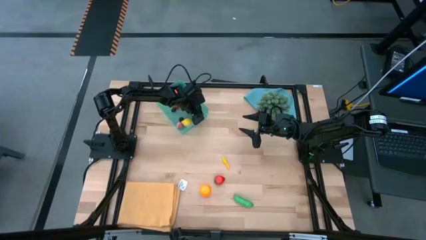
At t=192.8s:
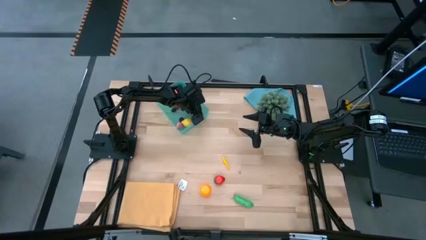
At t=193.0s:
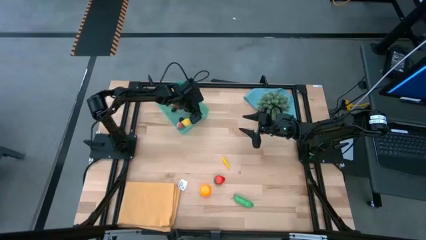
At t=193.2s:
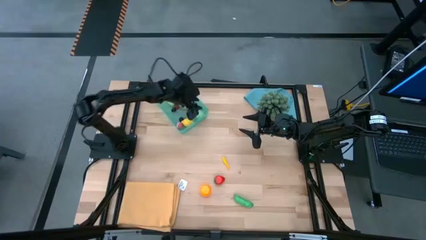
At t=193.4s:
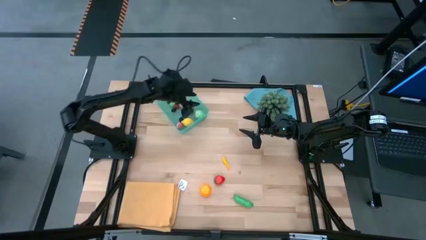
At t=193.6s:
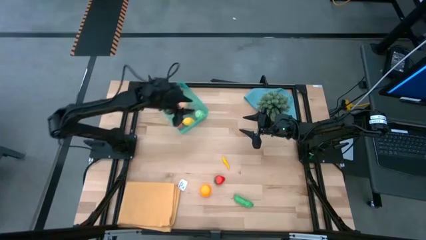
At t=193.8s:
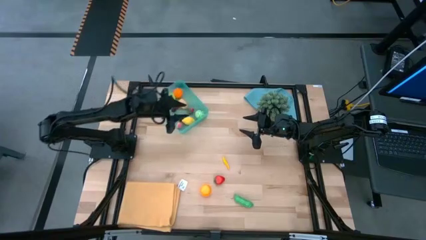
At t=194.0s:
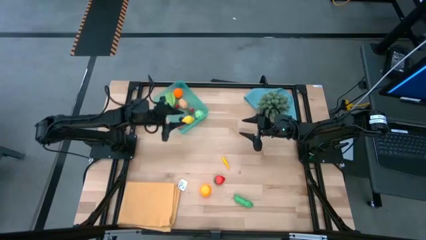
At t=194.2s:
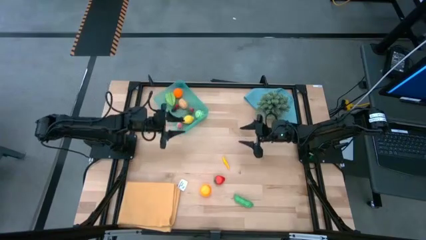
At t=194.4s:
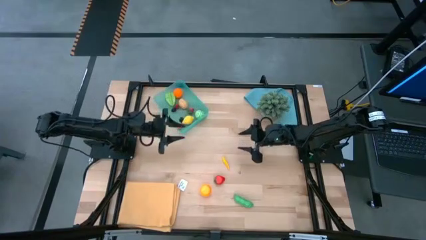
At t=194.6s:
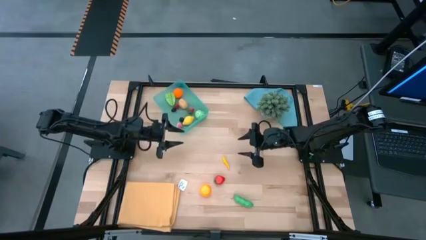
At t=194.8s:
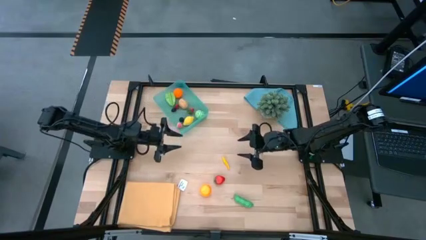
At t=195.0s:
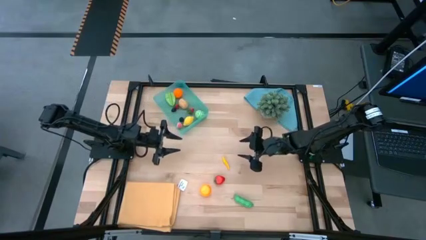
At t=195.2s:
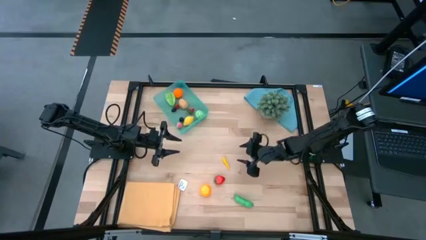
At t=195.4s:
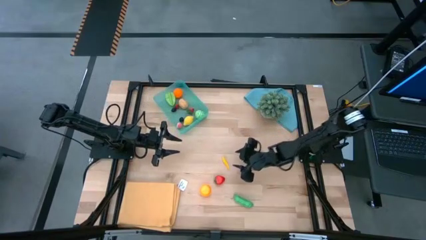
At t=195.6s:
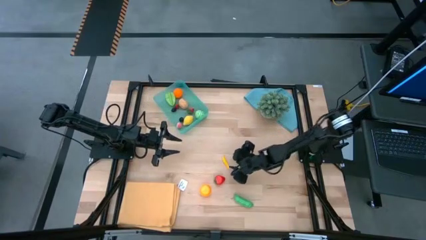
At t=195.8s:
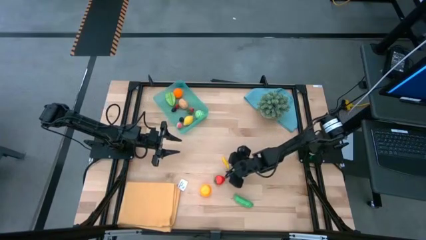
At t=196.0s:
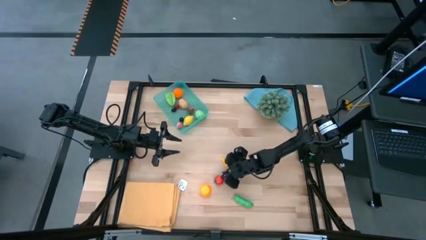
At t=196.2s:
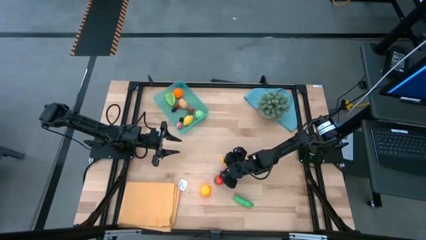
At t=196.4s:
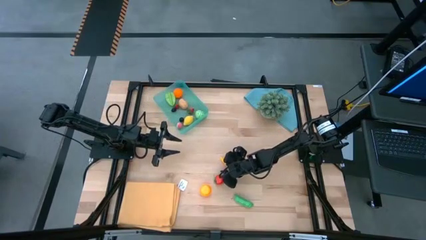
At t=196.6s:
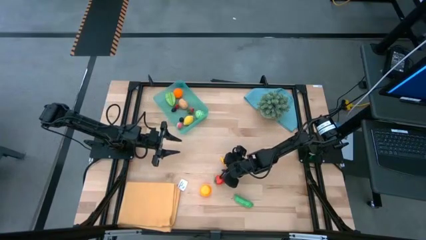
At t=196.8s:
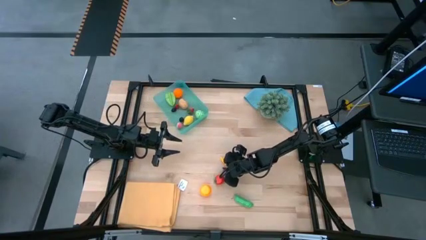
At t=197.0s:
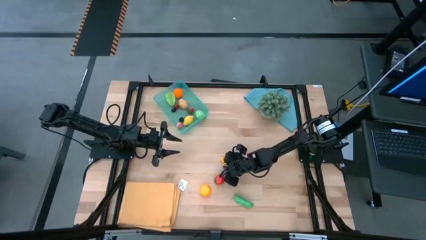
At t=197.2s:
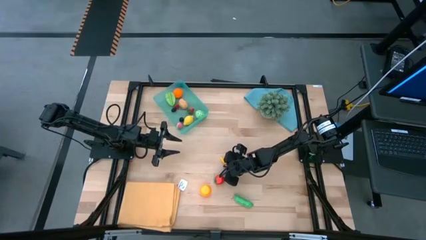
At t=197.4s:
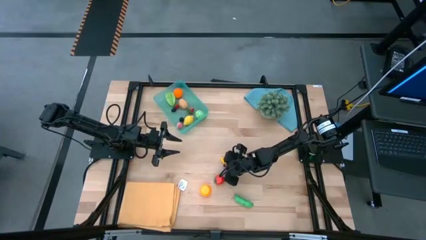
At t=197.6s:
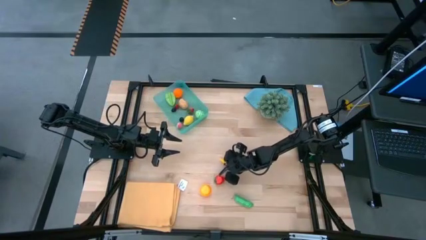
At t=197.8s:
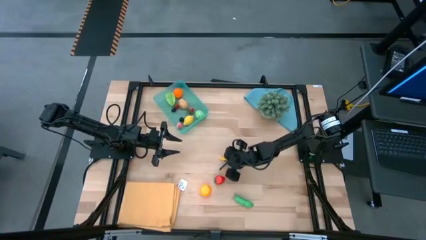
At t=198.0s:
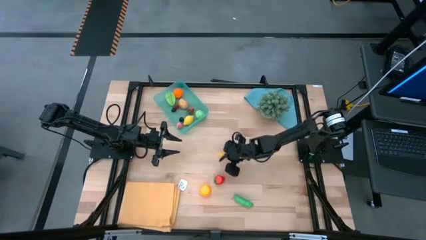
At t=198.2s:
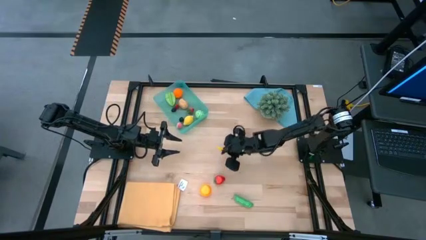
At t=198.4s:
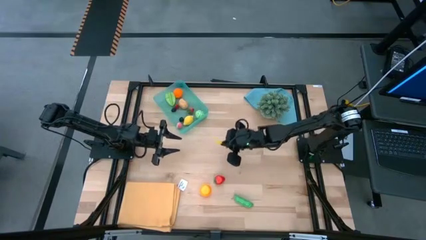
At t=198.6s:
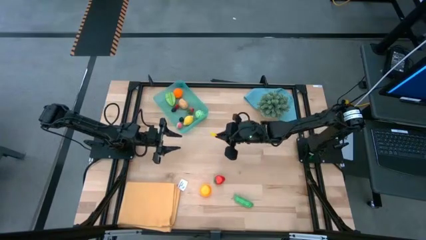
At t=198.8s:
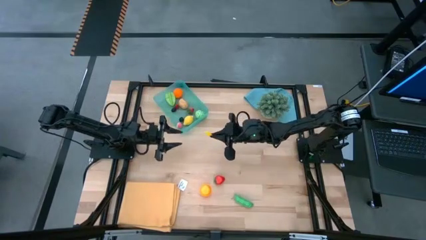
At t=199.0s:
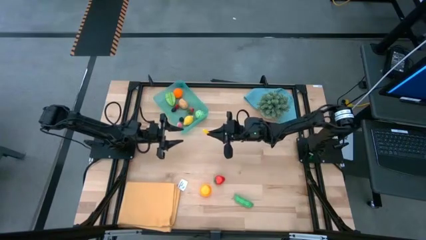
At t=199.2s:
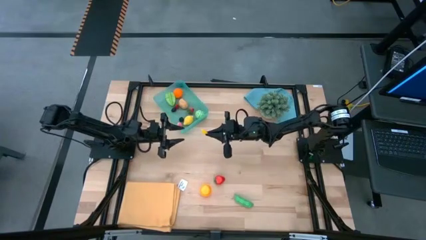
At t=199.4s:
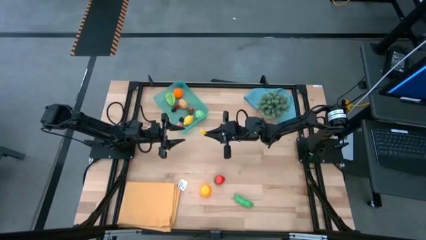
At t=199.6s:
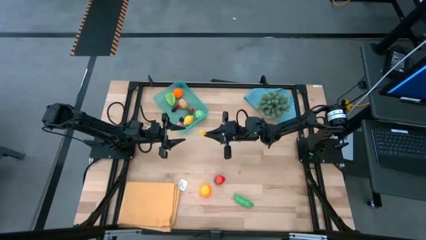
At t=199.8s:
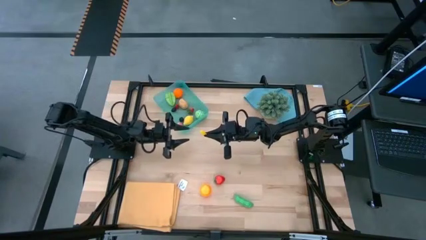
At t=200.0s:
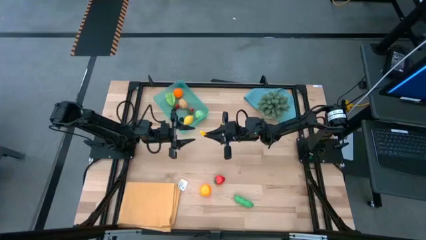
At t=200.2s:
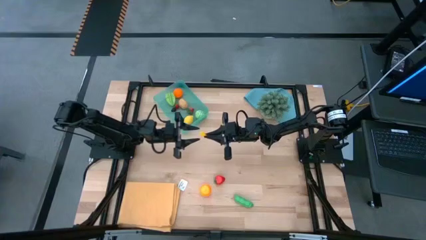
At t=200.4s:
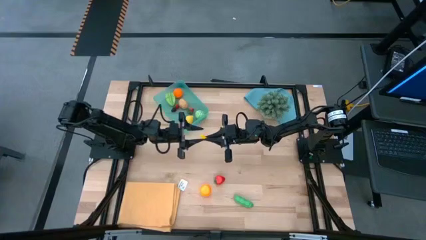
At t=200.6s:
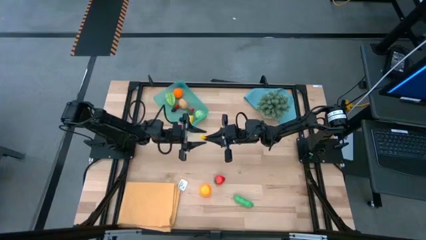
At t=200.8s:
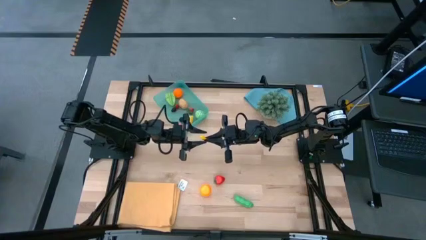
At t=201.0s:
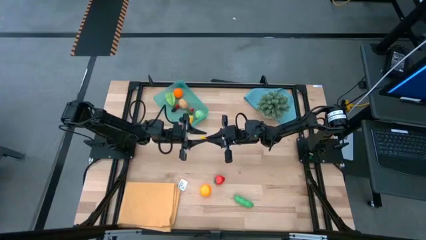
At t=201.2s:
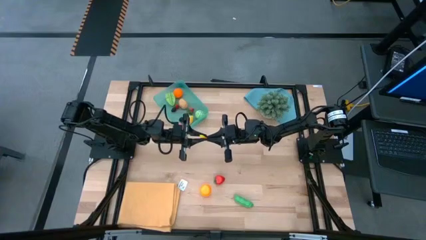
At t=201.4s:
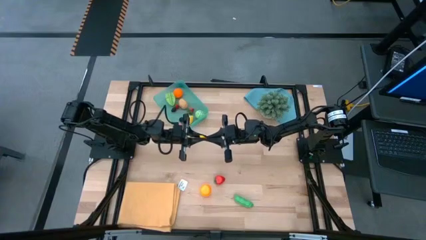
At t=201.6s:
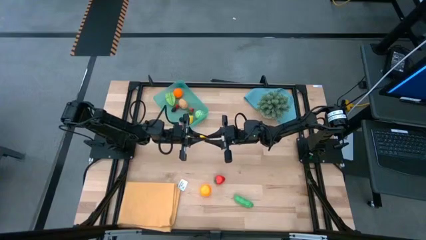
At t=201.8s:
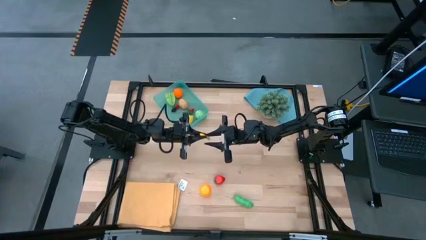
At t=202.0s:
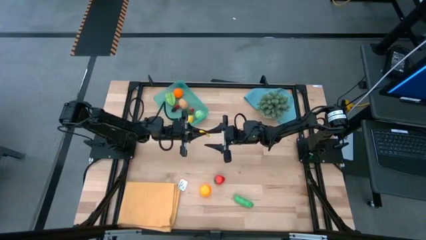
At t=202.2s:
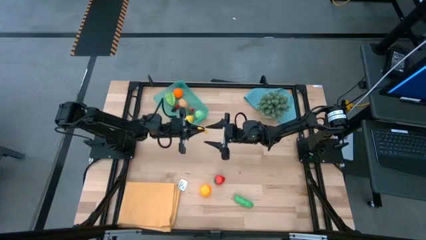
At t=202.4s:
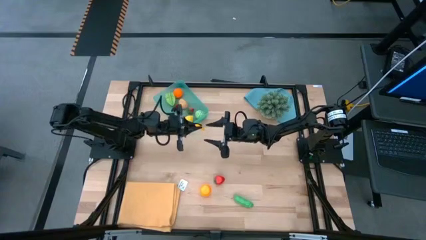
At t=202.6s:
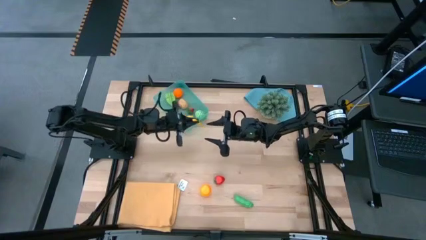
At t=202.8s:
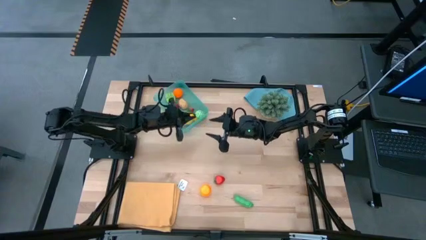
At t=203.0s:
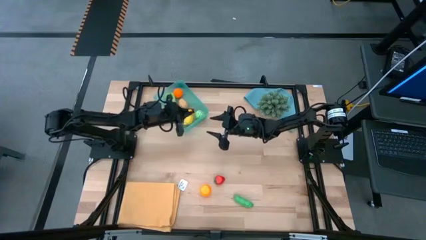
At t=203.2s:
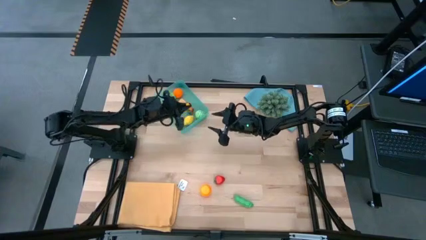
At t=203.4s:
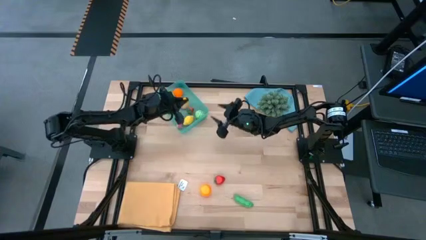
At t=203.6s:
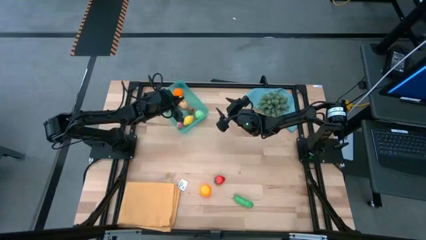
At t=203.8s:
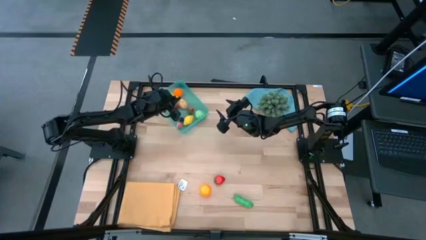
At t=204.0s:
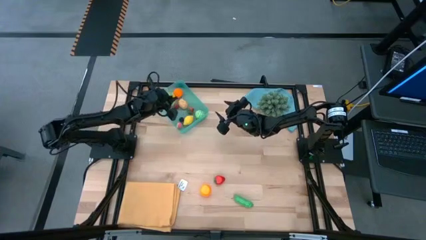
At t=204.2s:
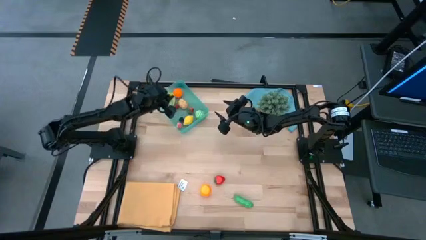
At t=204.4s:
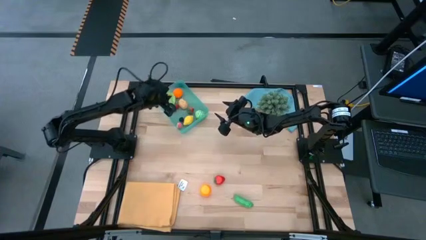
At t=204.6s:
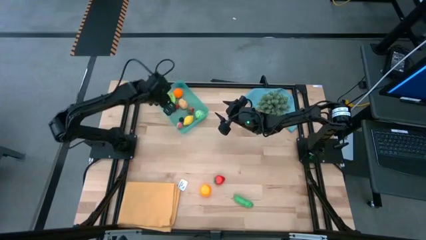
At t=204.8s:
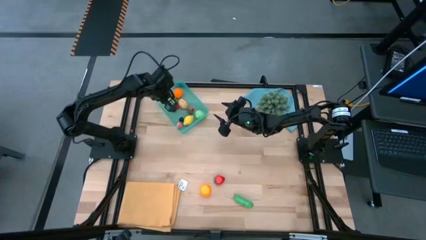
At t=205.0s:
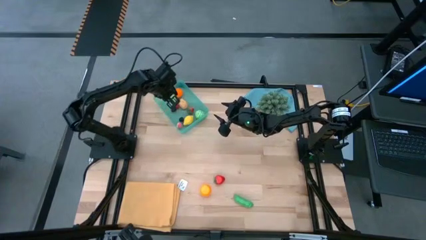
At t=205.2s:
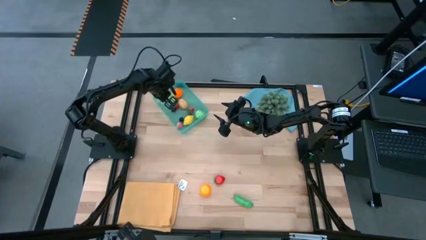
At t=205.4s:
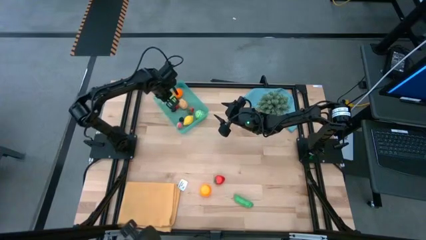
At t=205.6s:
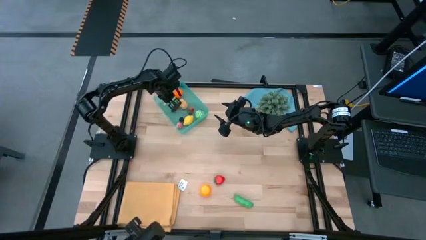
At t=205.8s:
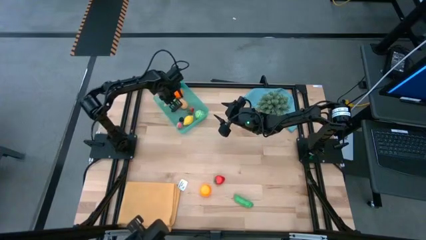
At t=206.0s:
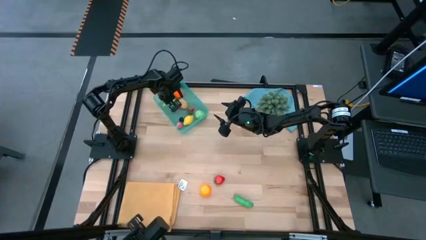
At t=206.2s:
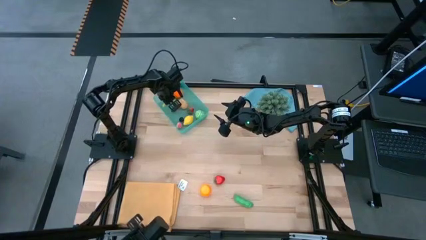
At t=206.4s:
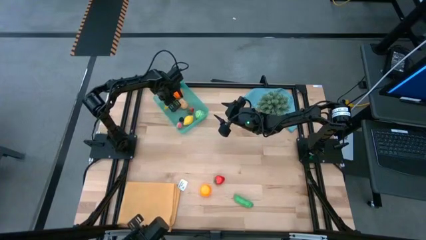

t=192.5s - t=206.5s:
Task: Pick and placing Produce into tupperware
Put the yellow corn into the blue bin

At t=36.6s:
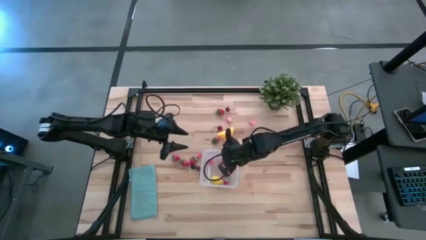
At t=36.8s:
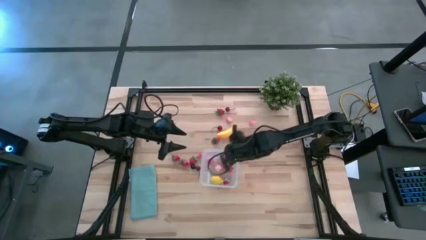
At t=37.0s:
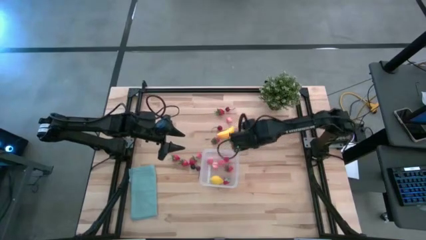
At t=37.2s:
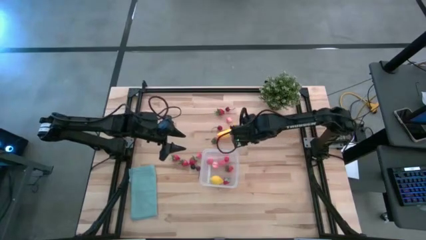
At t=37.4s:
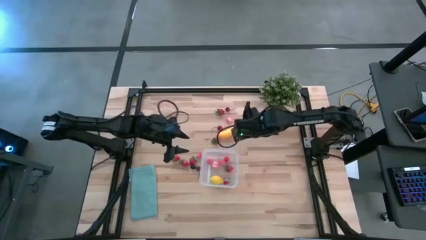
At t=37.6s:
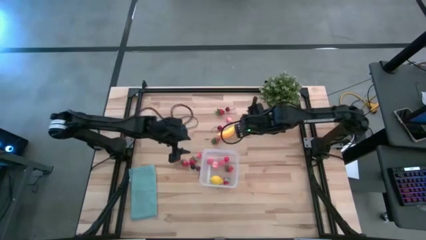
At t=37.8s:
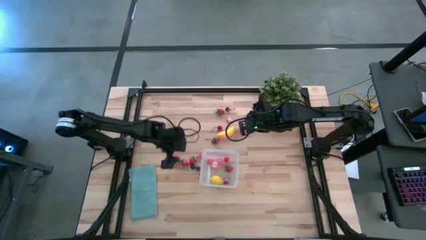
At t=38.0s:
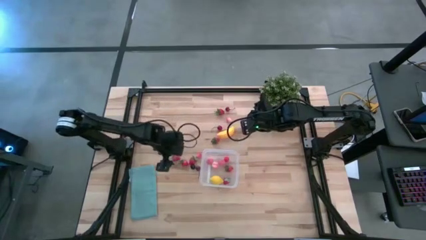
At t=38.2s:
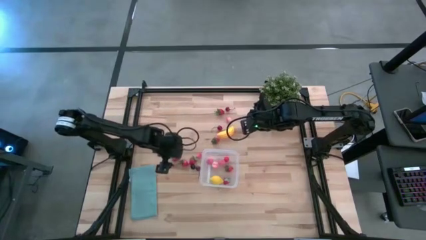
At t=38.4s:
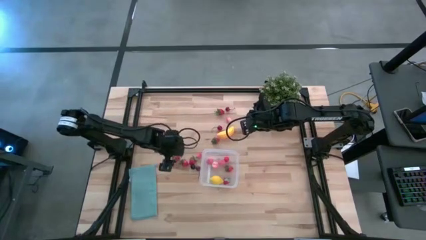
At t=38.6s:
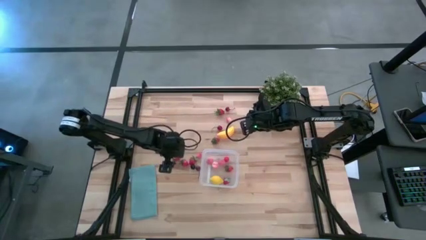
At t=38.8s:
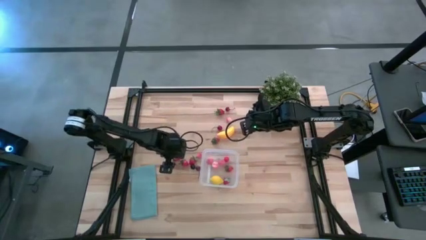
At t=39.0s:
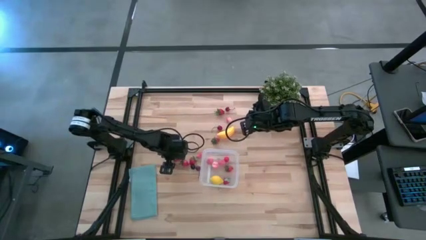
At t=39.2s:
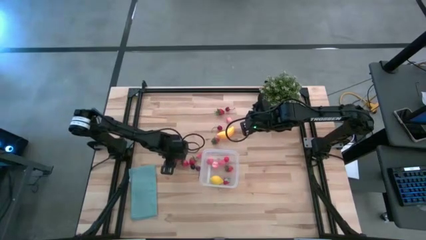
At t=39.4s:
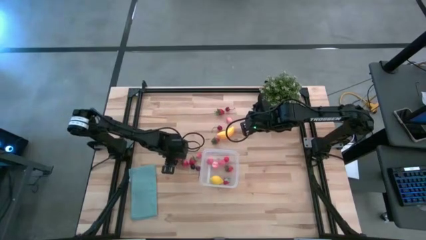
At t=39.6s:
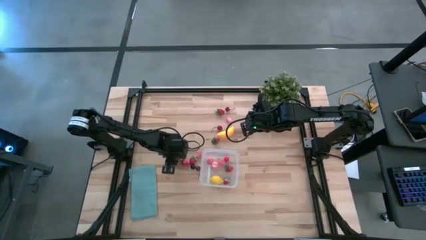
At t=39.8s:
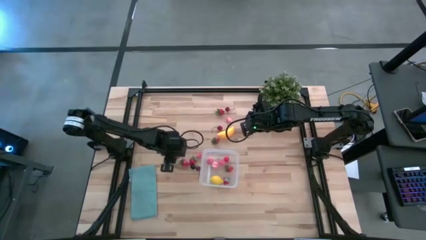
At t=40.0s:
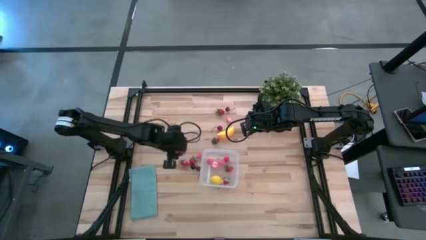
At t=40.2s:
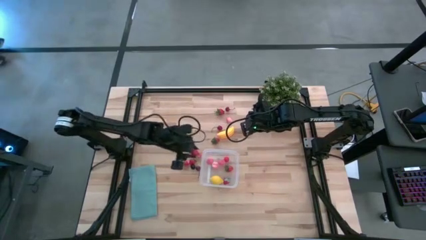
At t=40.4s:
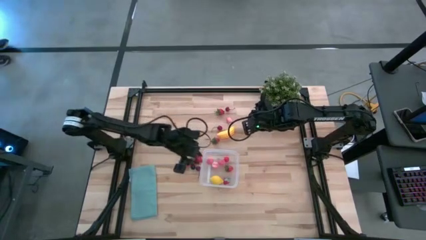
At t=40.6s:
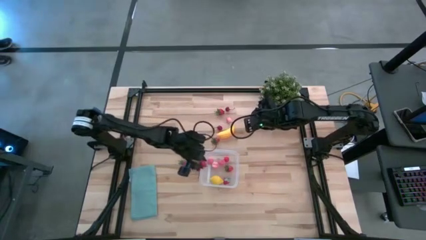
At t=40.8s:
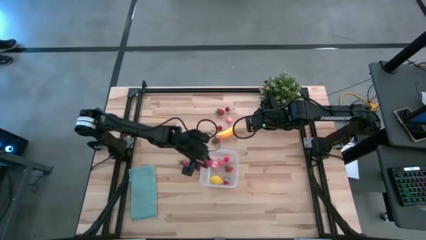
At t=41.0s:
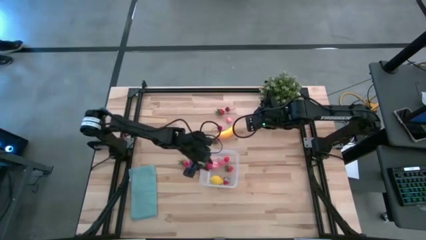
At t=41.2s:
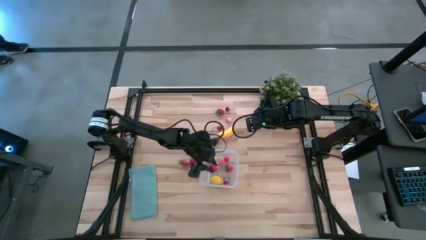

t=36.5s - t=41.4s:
Task: Pick and placing Produce into tupperware
Put the red strawberry into the transparent container
